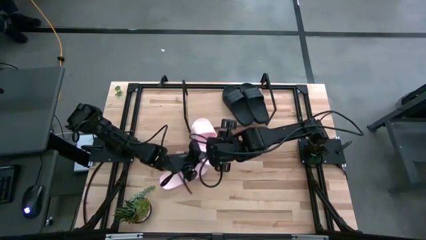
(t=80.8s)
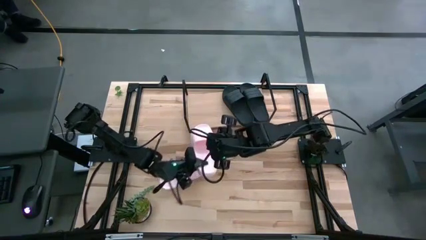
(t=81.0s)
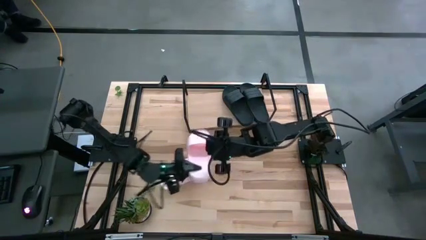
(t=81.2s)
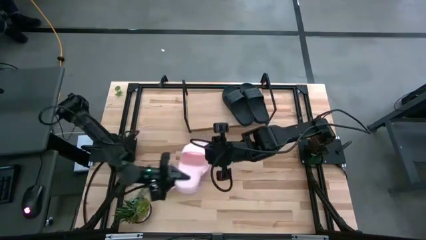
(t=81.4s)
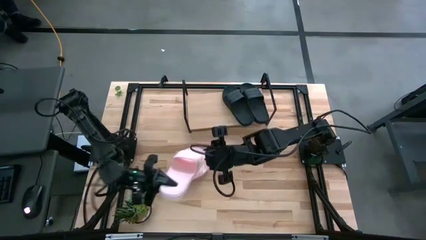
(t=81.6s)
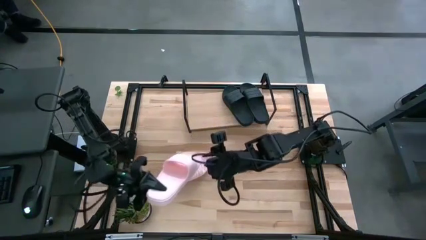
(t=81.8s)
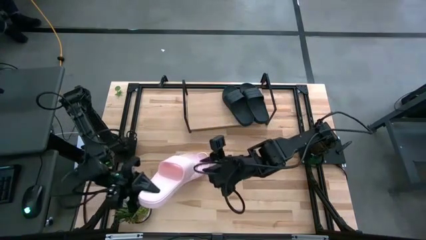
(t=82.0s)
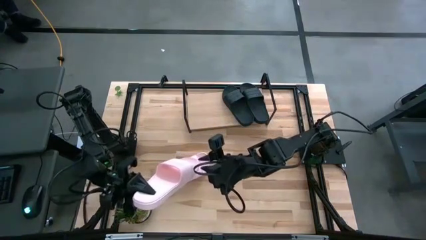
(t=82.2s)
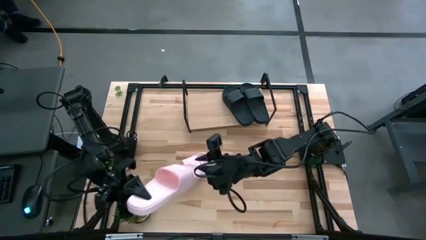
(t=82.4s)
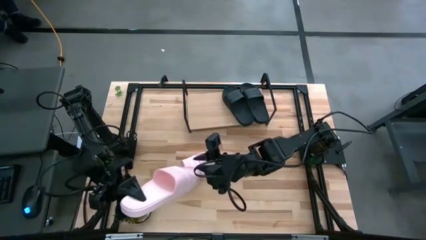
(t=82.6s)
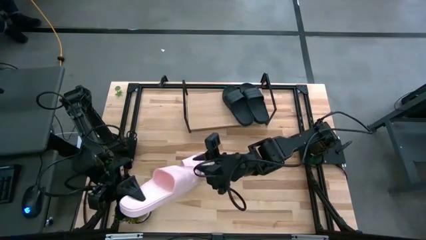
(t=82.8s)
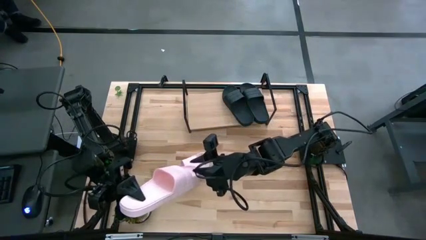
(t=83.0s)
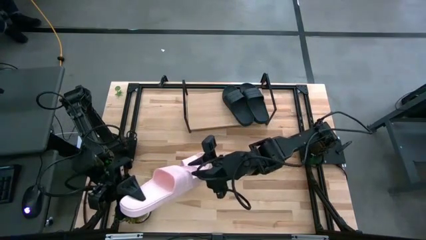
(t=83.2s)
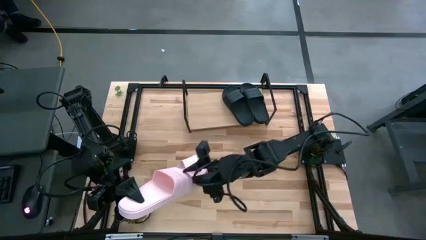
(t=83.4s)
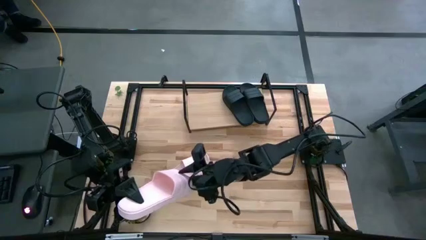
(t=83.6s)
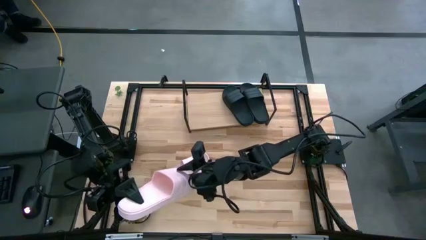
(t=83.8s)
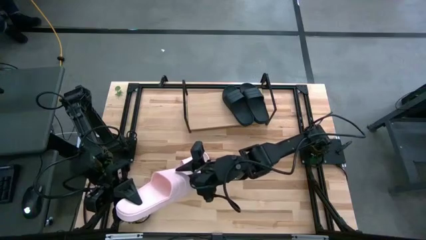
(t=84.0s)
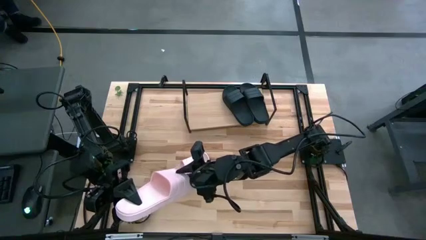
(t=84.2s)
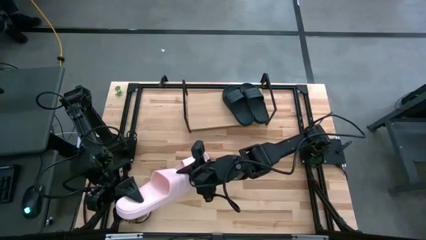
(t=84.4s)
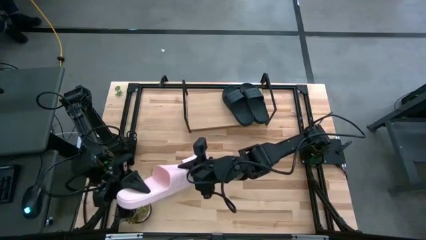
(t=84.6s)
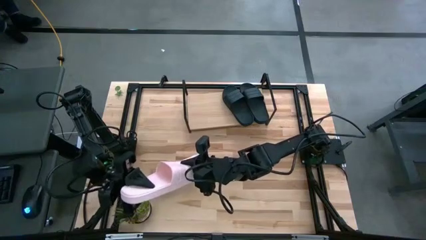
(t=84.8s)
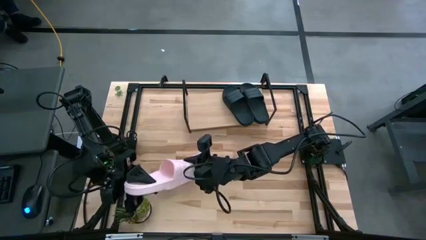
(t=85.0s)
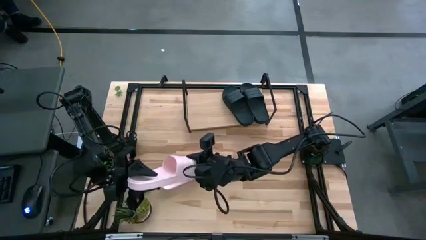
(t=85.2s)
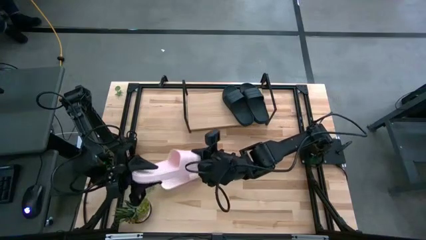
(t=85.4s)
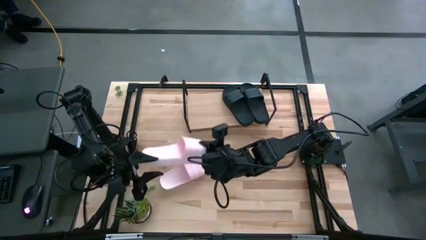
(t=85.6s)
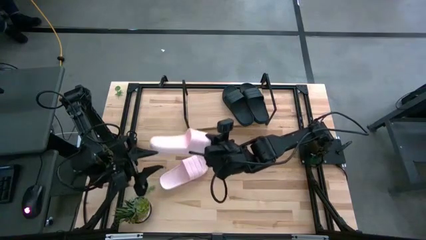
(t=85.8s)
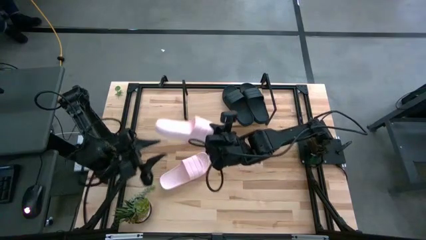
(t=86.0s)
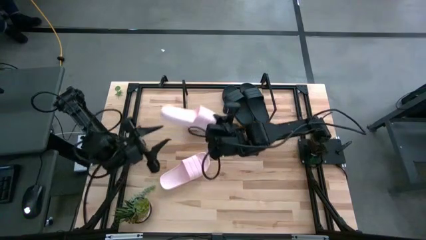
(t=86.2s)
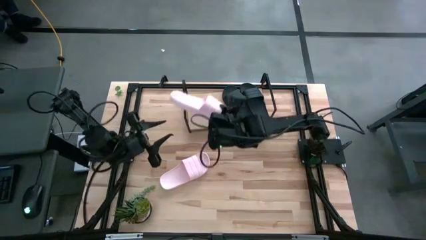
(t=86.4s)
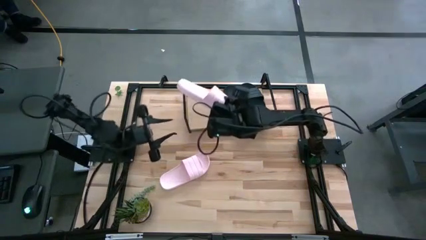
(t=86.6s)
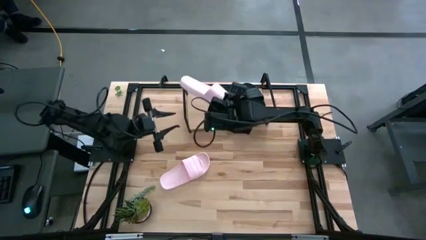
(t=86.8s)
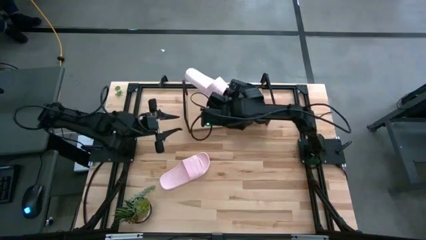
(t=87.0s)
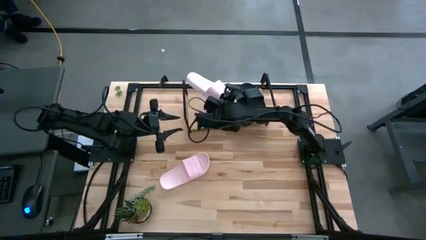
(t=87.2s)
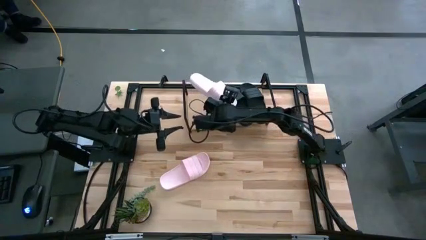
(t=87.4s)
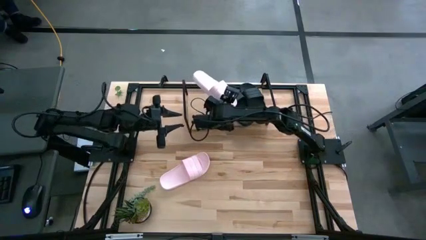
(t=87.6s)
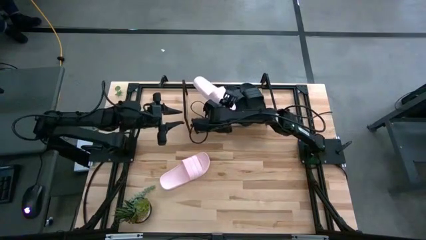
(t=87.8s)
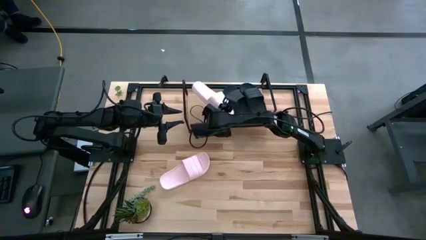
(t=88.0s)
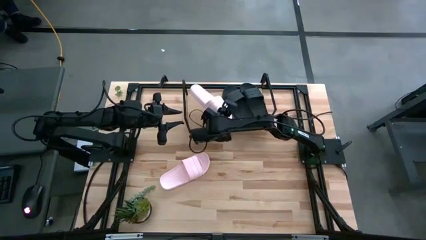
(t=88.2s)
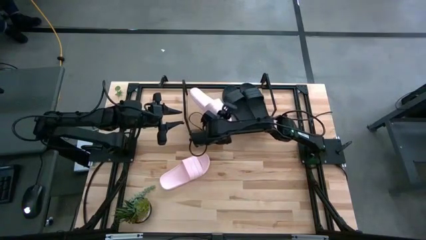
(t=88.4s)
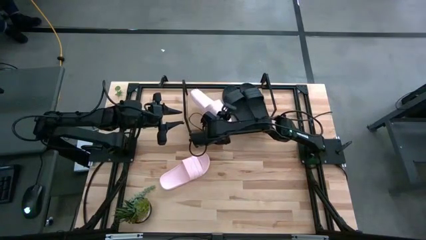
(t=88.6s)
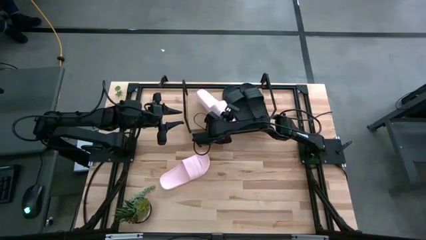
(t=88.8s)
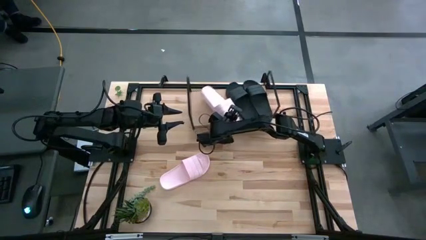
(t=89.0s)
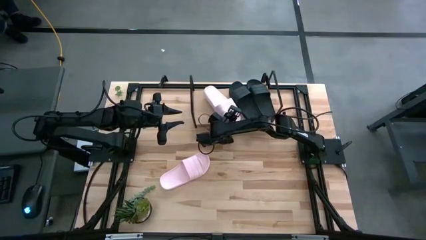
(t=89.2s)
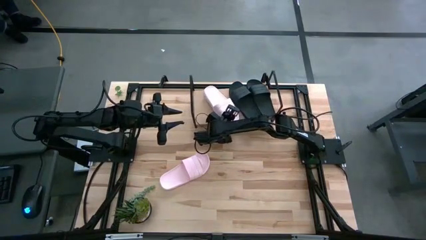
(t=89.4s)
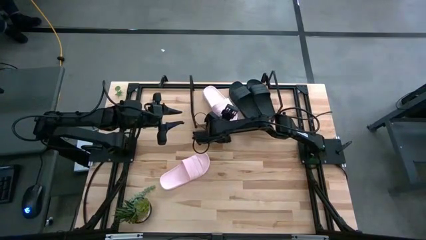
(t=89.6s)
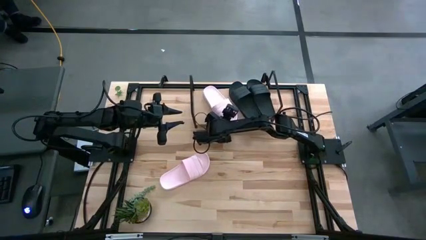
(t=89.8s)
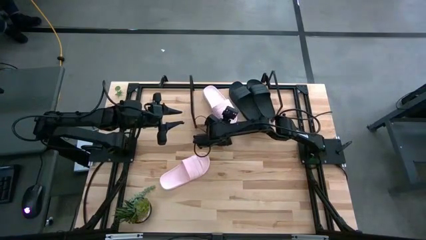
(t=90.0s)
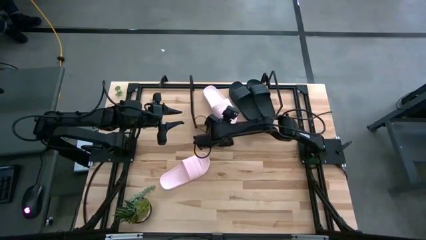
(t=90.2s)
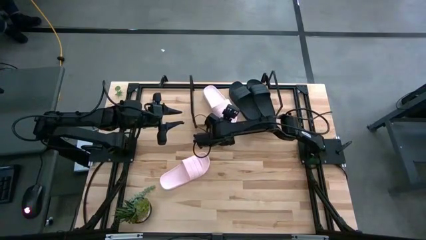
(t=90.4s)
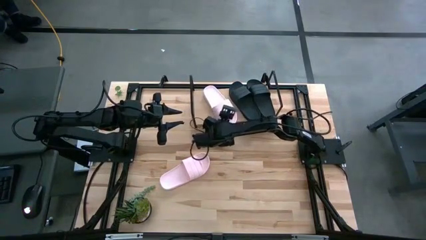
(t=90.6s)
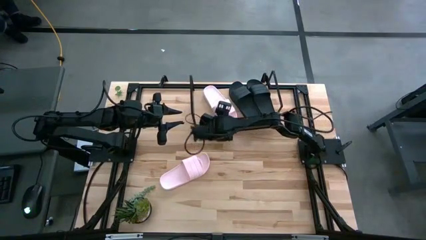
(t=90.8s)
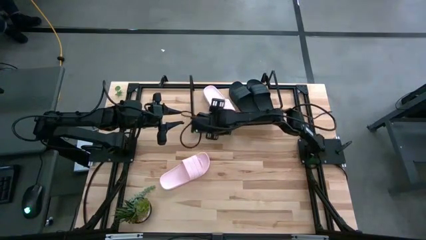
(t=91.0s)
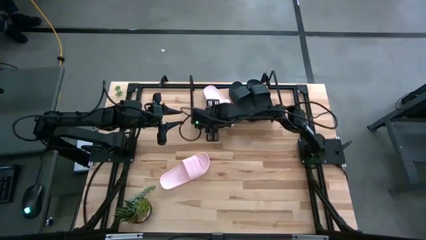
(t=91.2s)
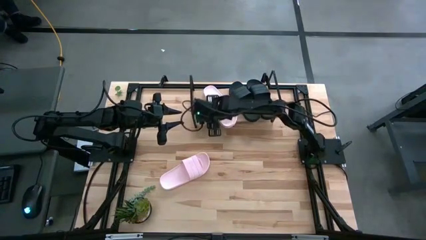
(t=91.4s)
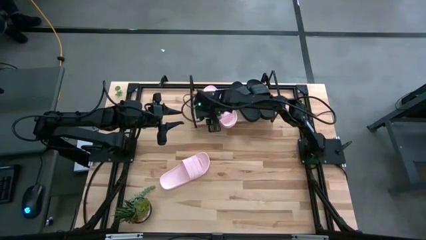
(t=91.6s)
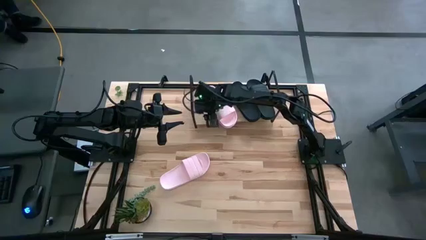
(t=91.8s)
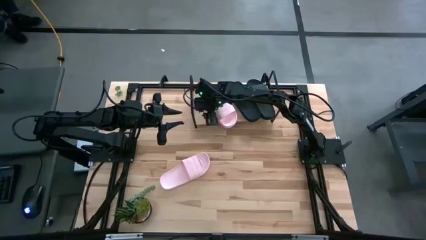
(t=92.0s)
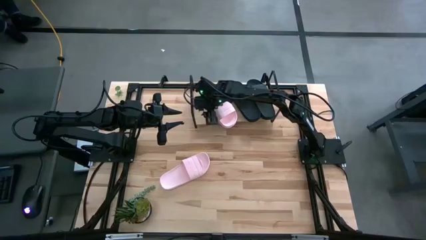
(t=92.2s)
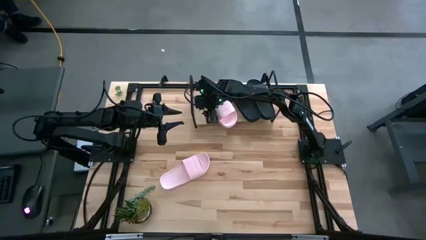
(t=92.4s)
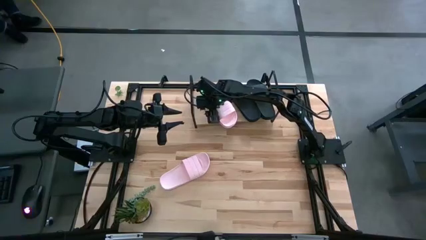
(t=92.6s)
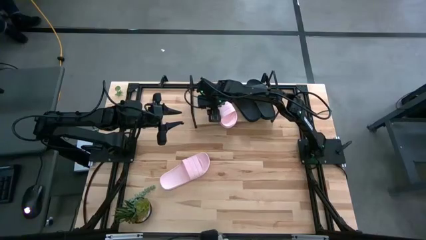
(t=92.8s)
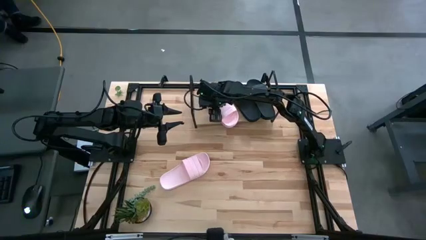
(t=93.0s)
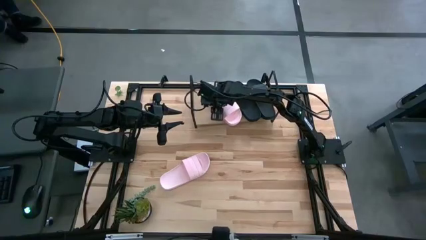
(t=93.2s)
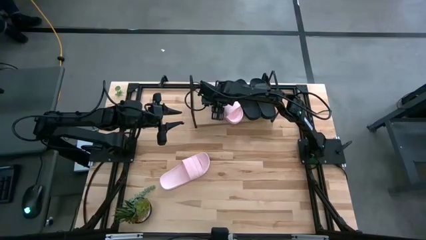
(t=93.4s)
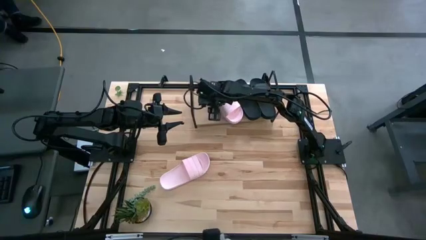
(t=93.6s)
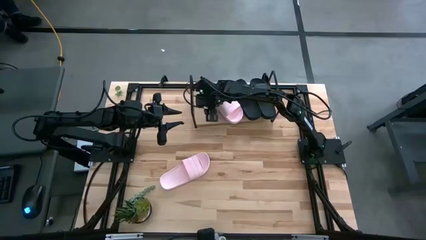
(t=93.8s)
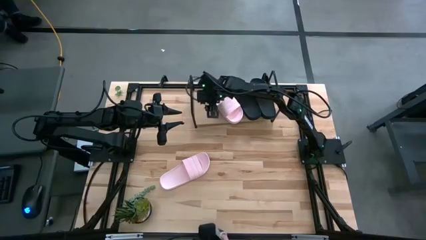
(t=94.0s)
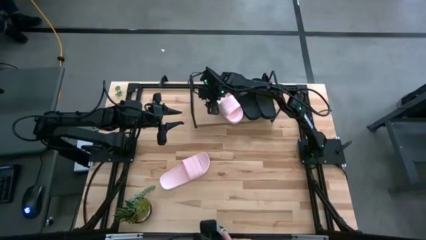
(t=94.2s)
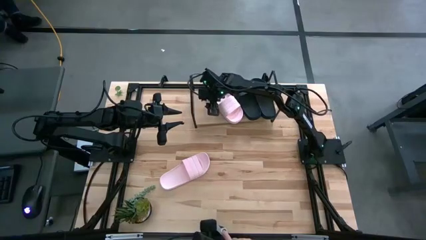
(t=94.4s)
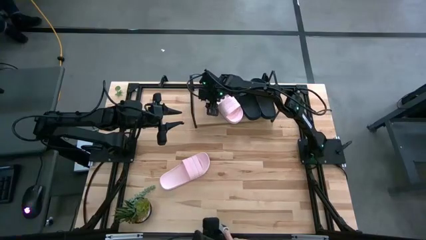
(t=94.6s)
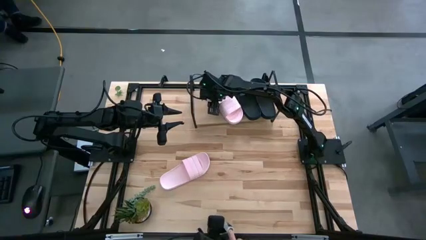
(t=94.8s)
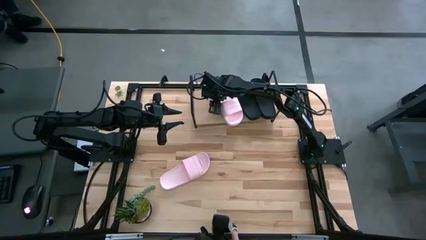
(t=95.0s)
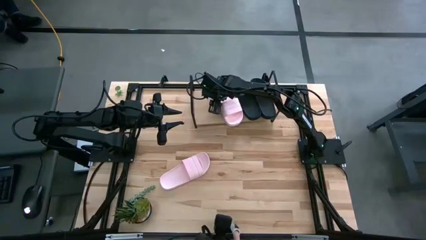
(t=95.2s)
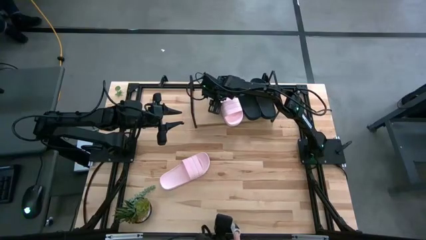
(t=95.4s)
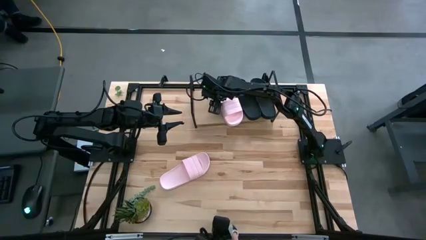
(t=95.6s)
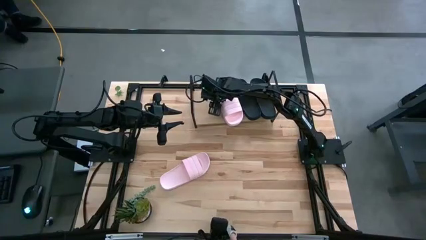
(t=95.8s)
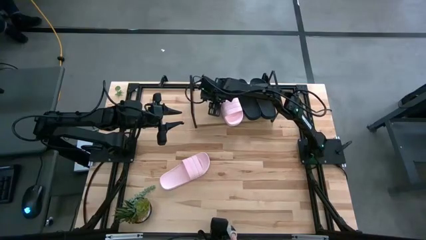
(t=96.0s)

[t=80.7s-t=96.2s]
Task: Pick and place slides into the shelf
Put the right pink slide on the shelf
